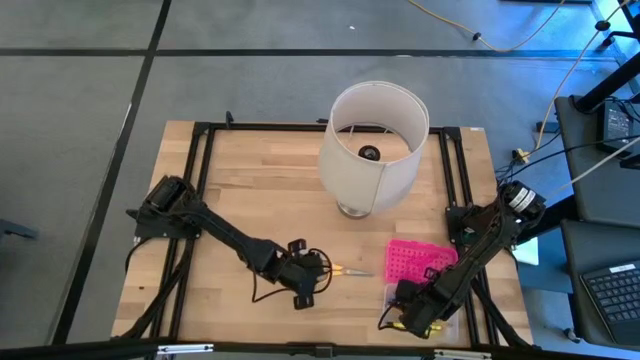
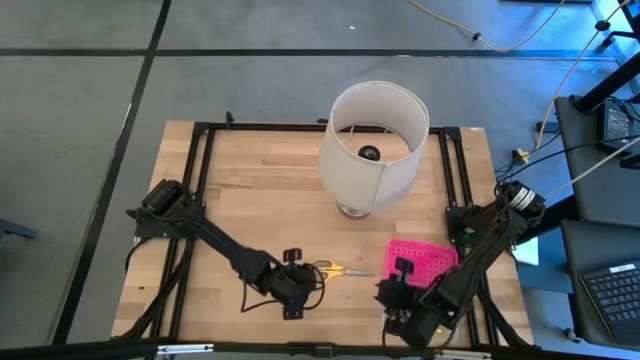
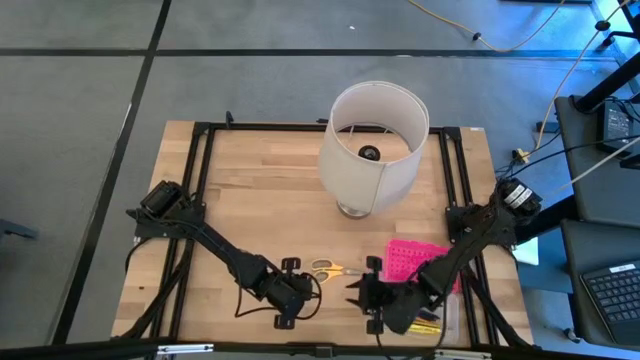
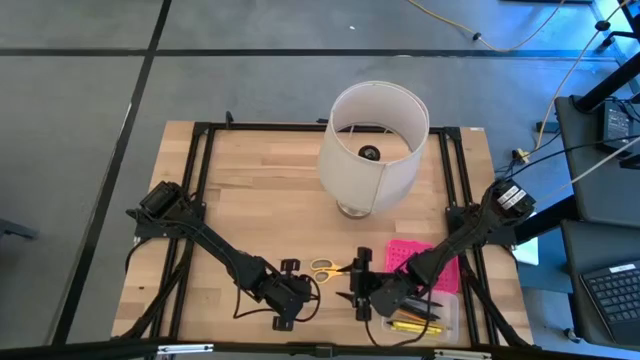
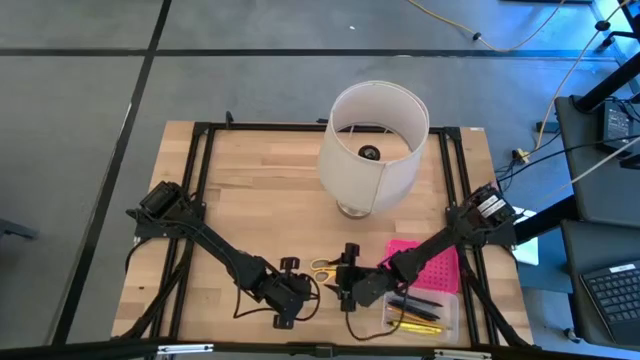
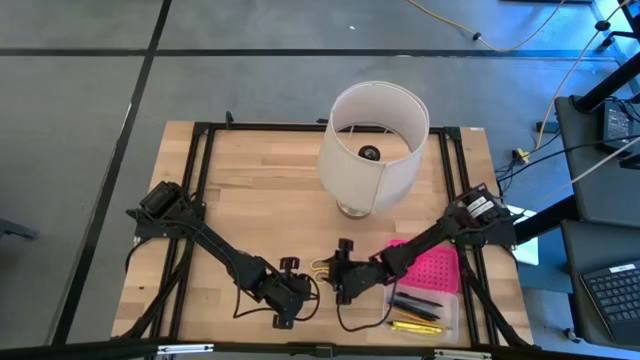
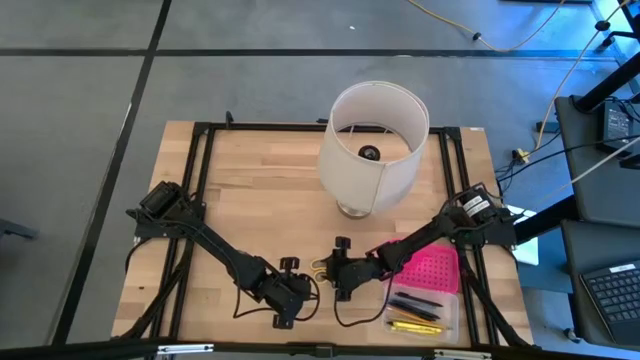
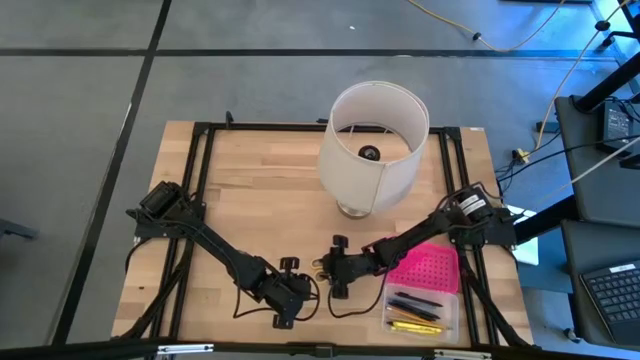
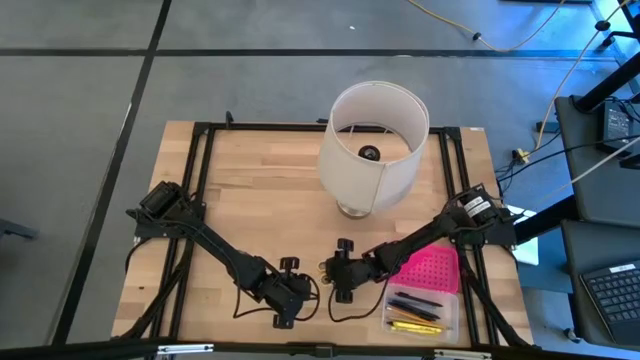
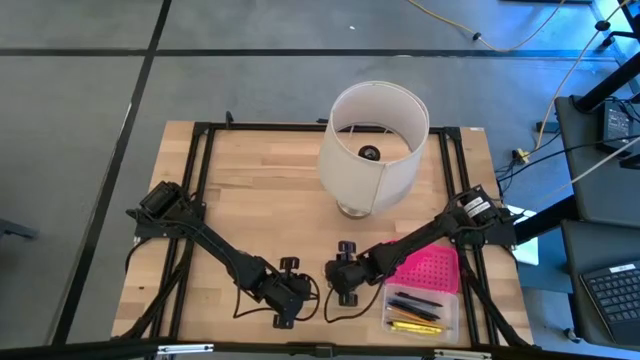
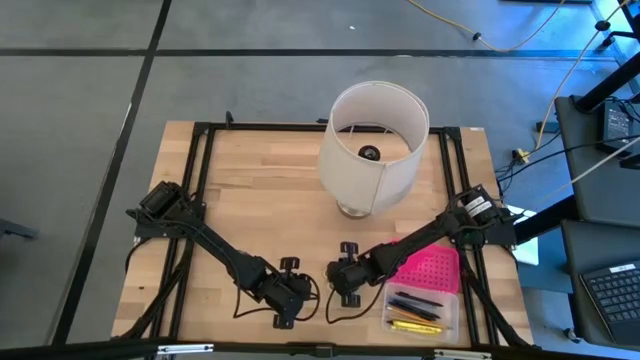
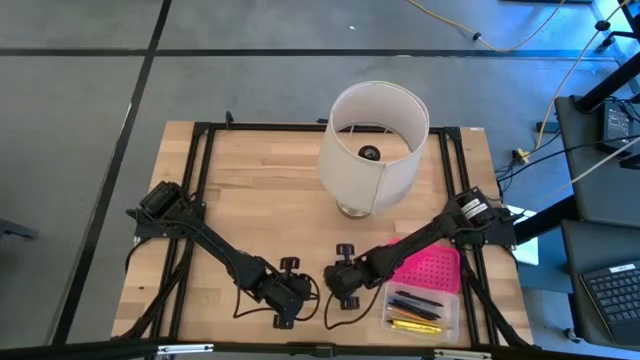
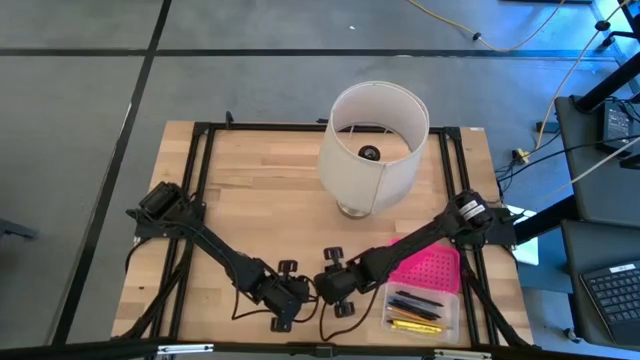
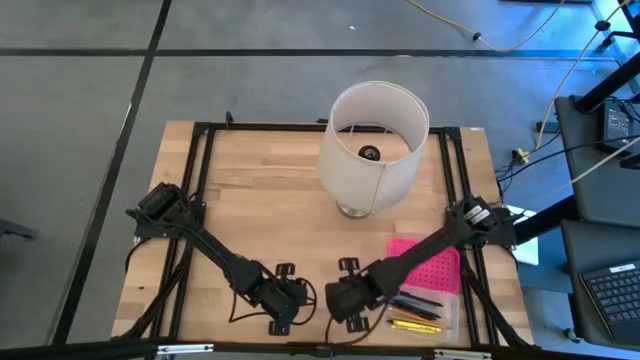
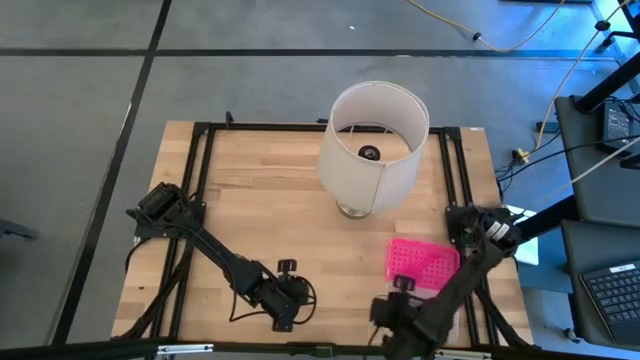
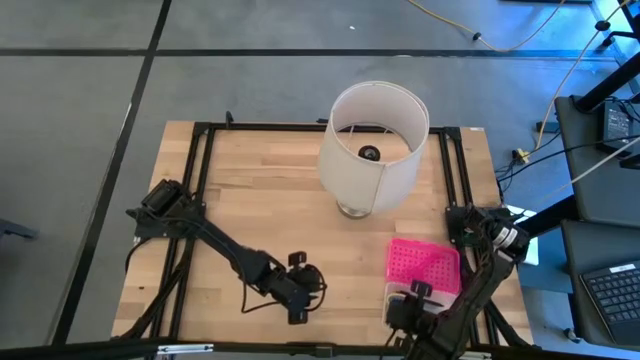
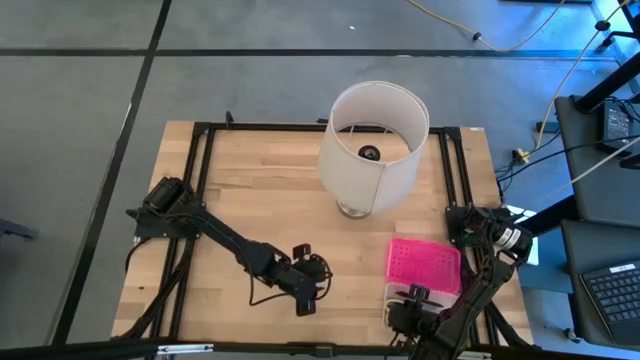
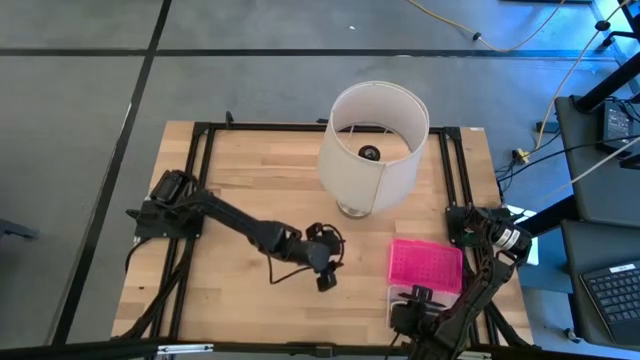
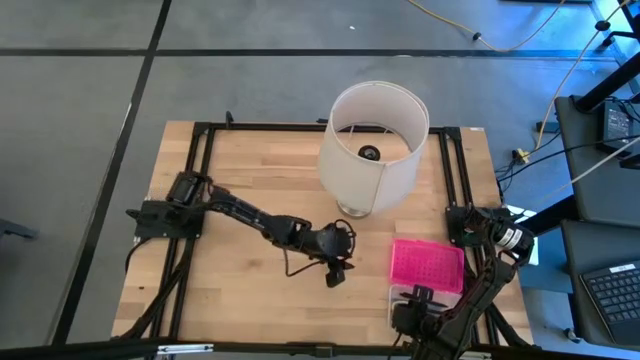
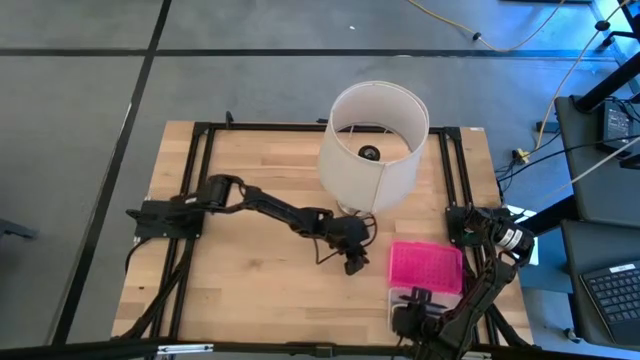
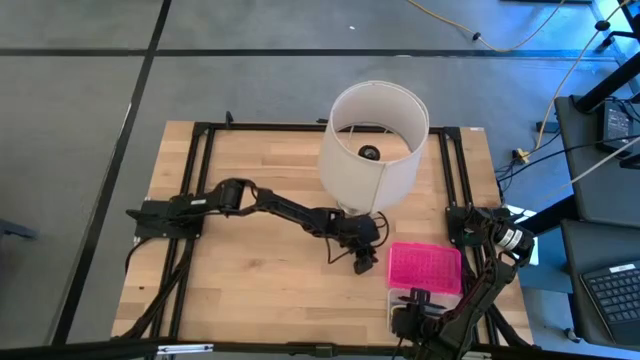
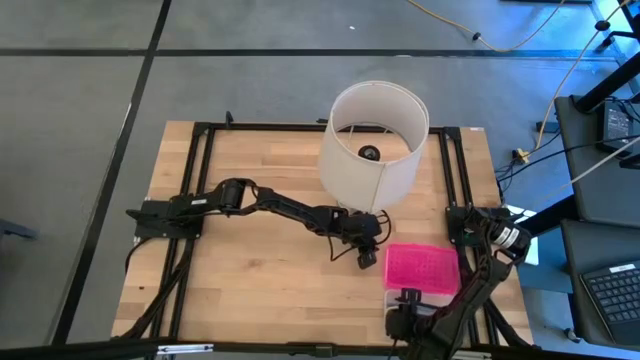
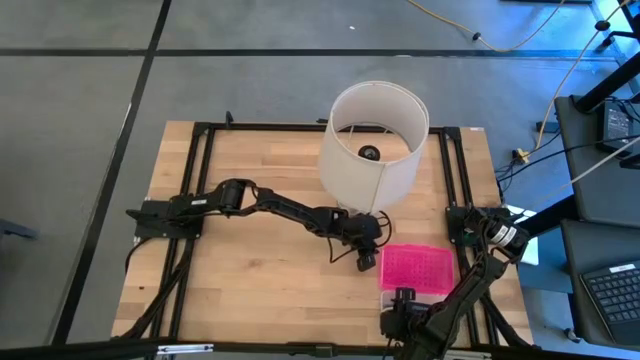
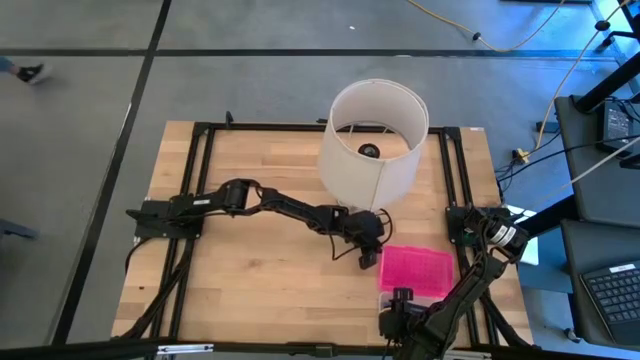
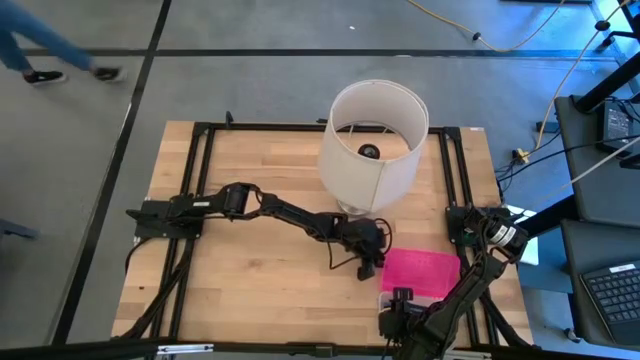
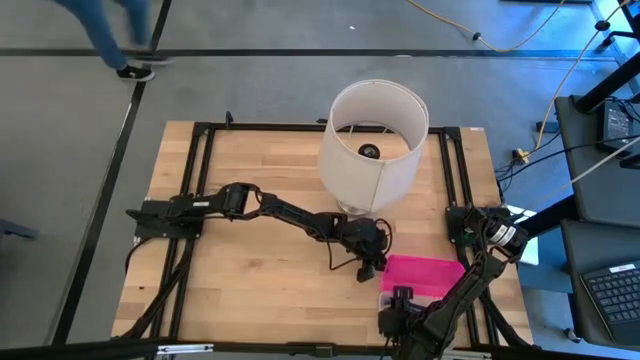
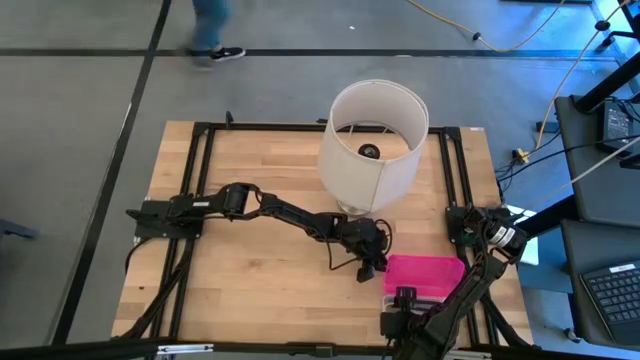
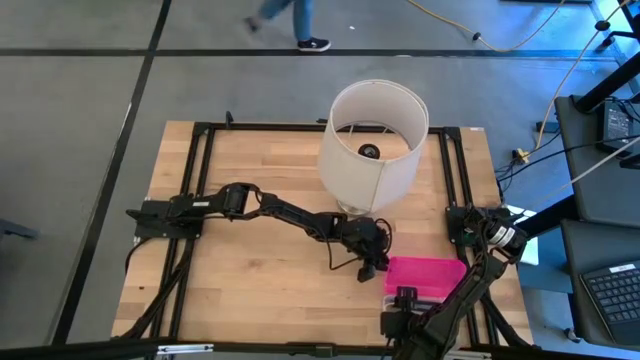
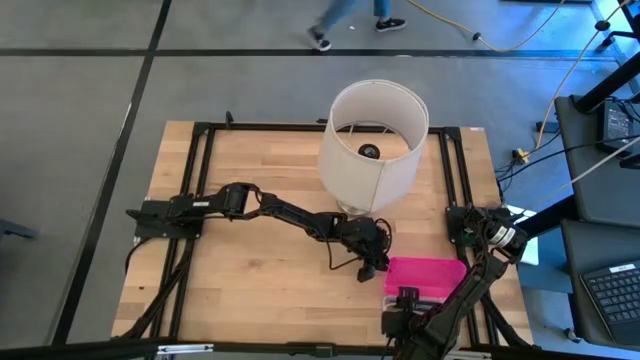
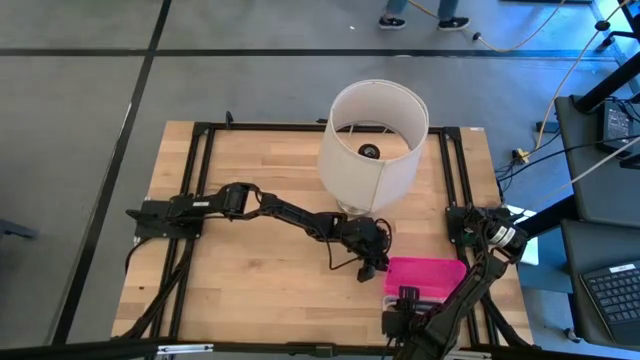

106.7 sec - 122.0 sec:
Task: Pick & place school supplies into a supply box
Put the yellow scissors into the supply box

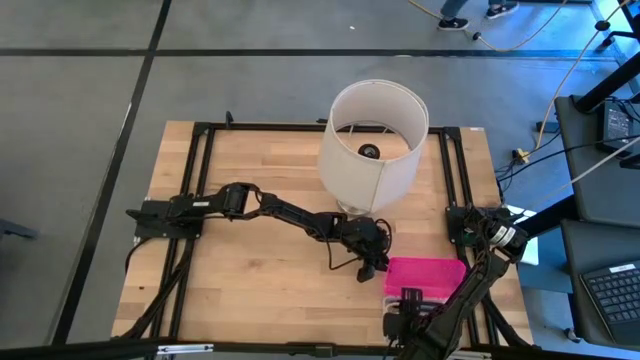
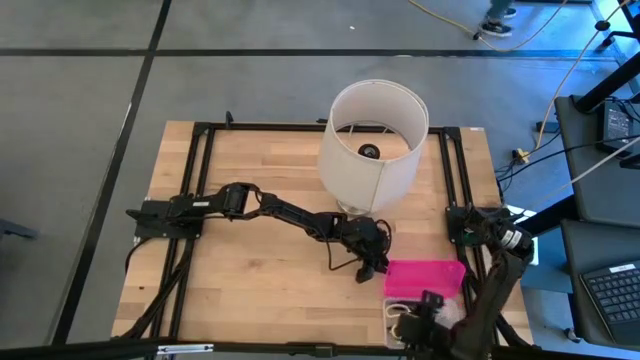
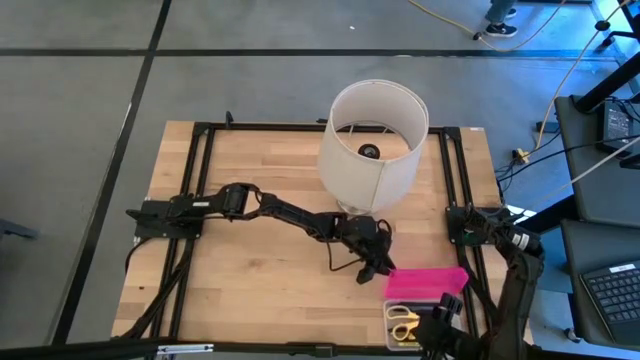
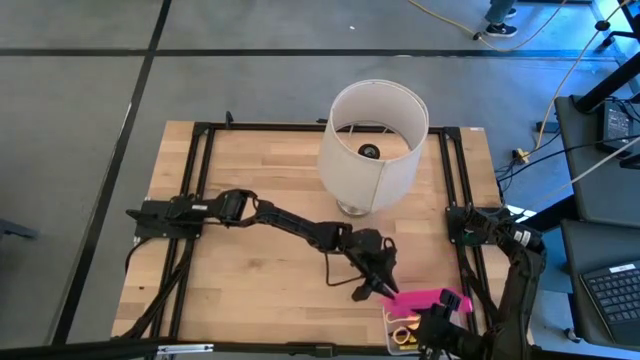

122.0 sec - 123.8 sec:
Close the pink supply box

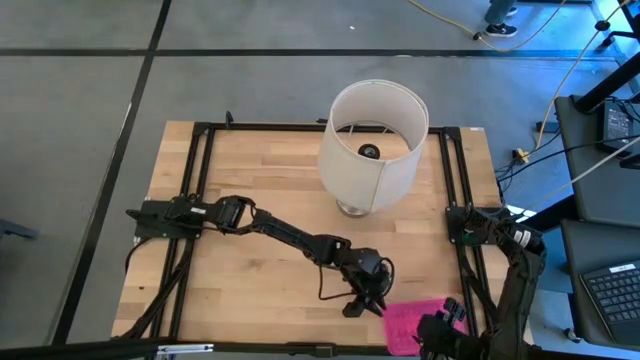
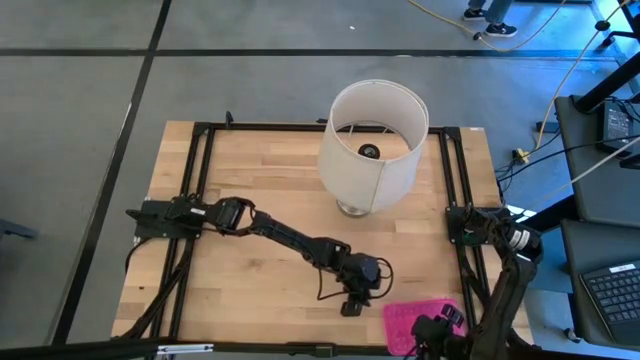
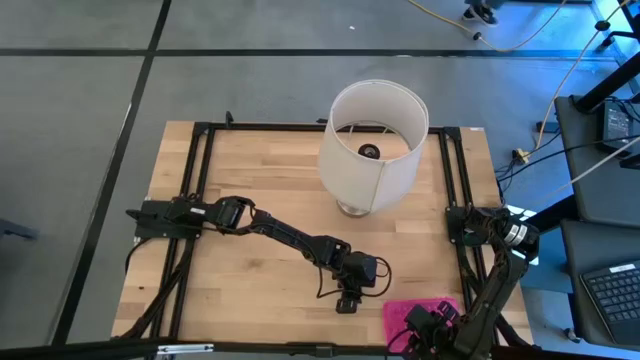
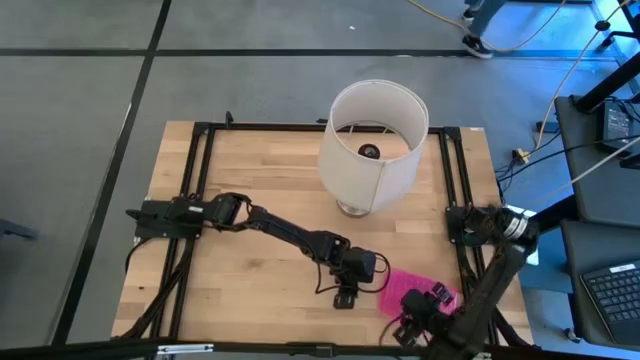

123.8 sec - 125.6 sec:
Adjust the pink supply box
